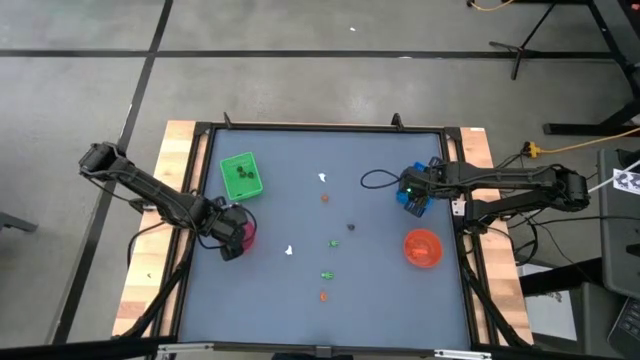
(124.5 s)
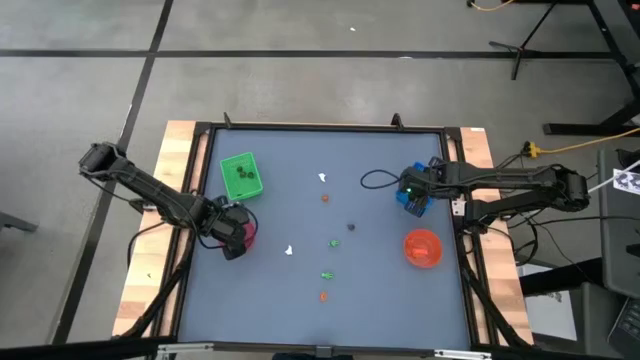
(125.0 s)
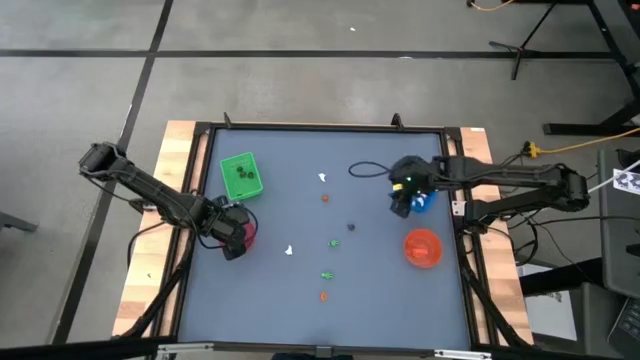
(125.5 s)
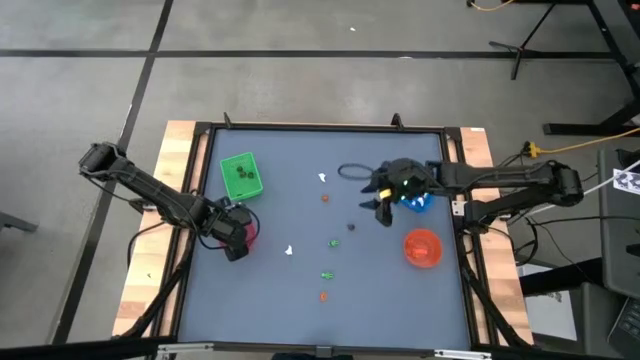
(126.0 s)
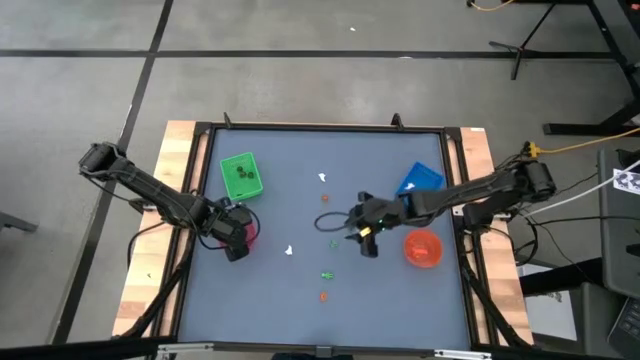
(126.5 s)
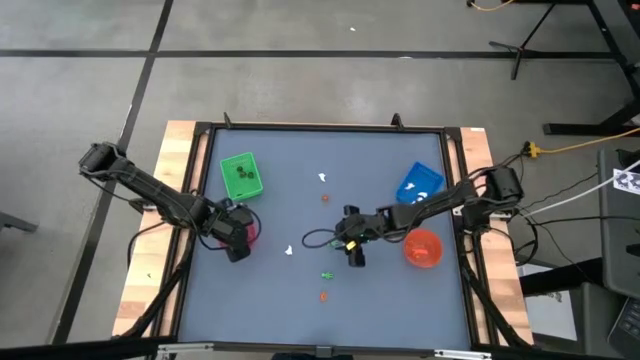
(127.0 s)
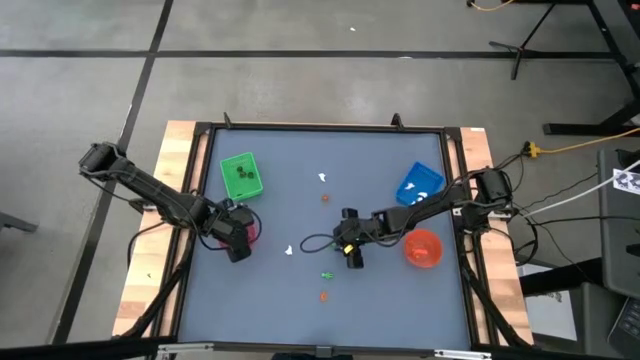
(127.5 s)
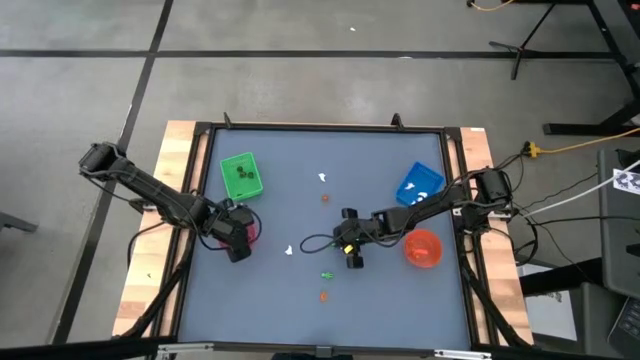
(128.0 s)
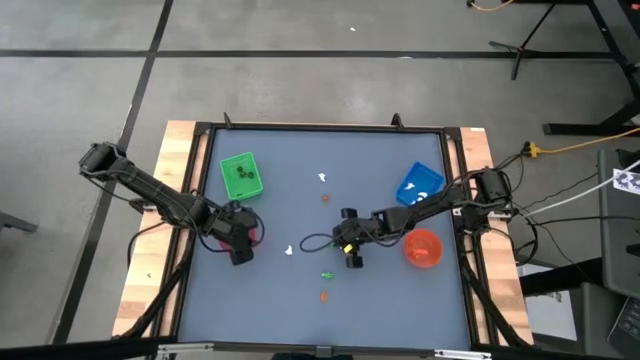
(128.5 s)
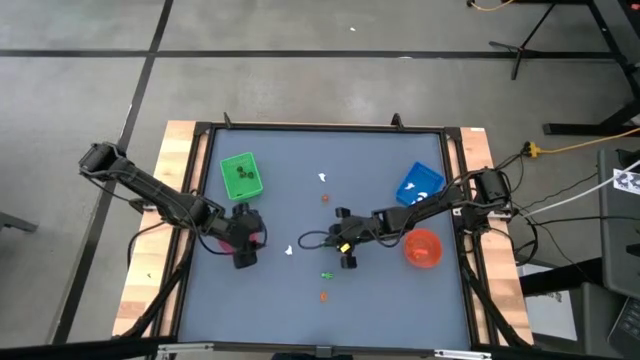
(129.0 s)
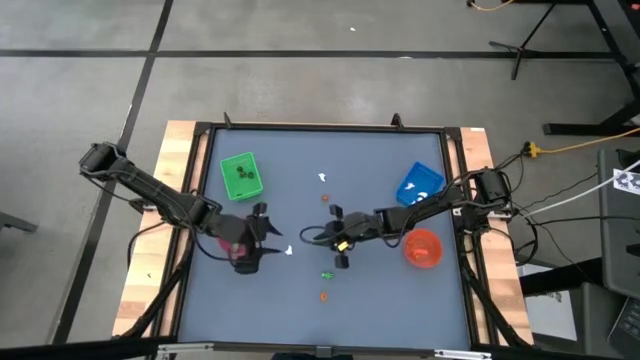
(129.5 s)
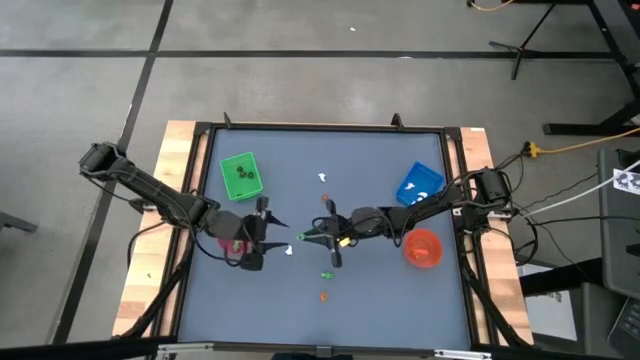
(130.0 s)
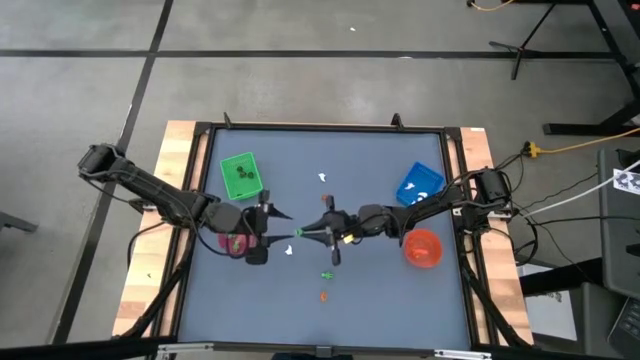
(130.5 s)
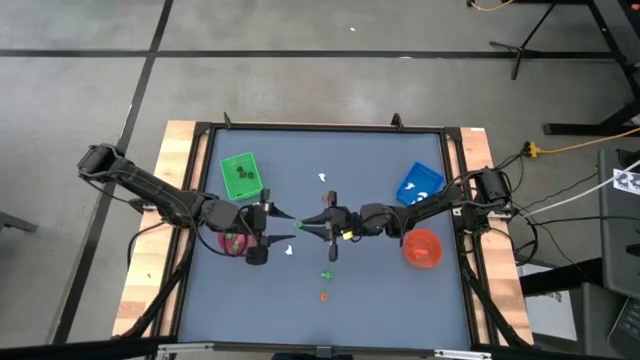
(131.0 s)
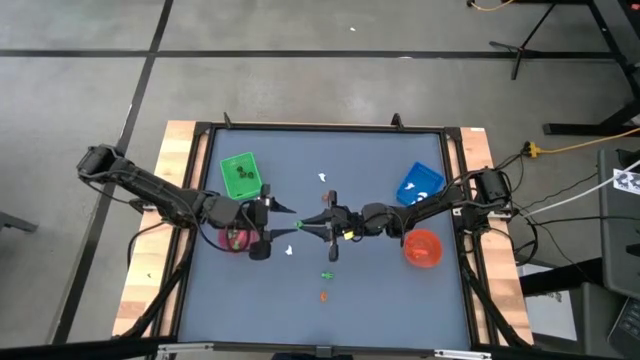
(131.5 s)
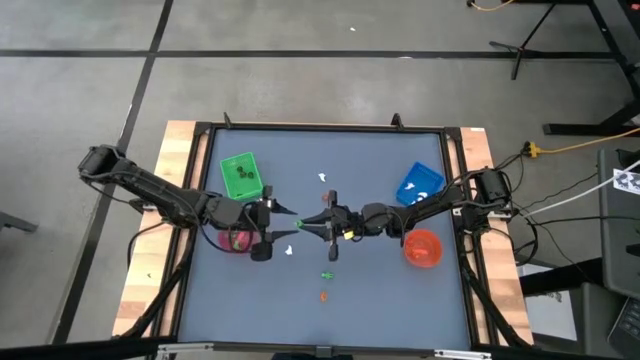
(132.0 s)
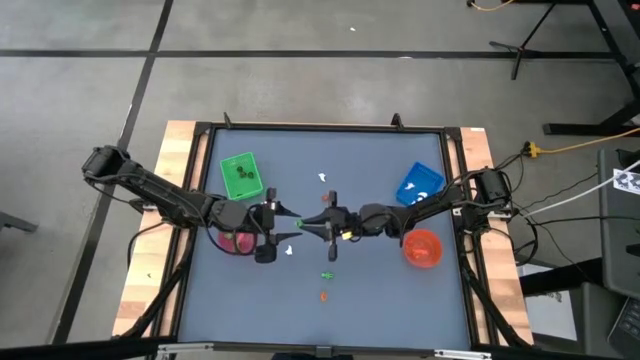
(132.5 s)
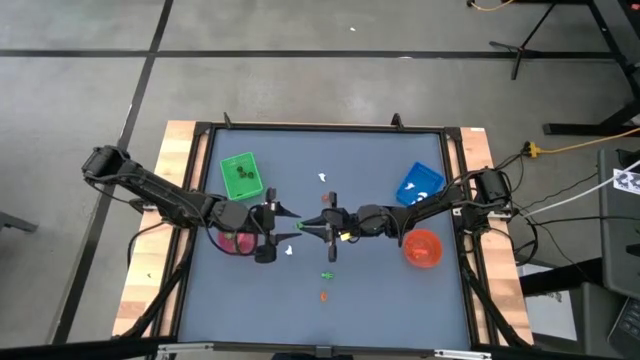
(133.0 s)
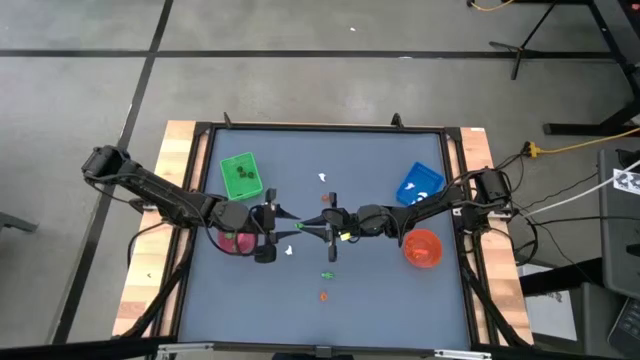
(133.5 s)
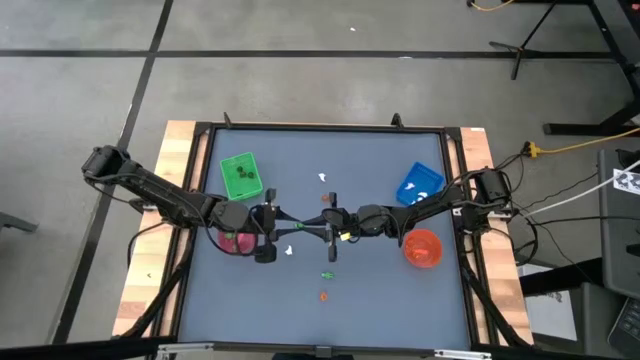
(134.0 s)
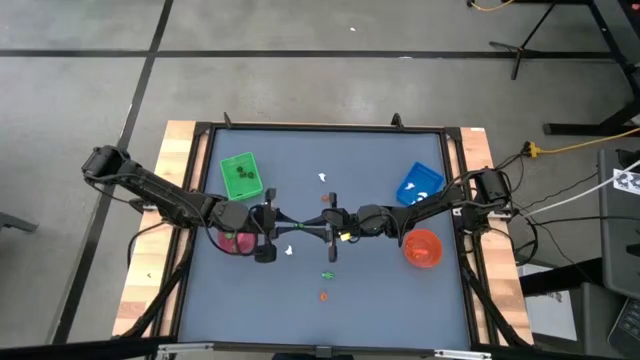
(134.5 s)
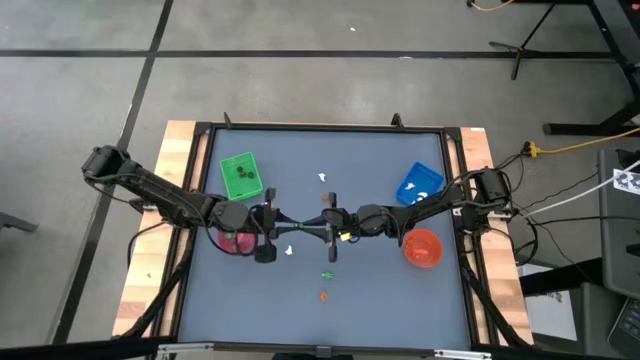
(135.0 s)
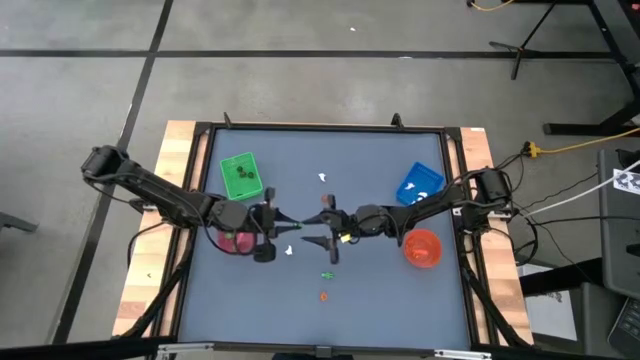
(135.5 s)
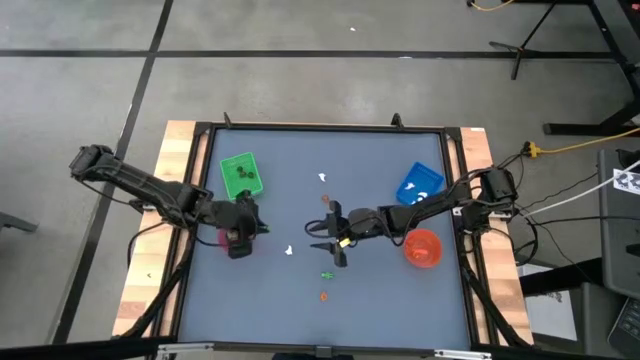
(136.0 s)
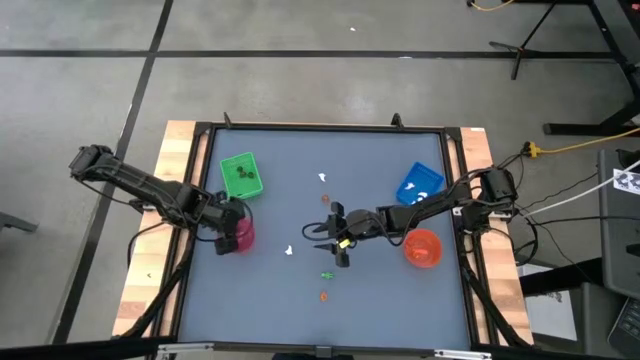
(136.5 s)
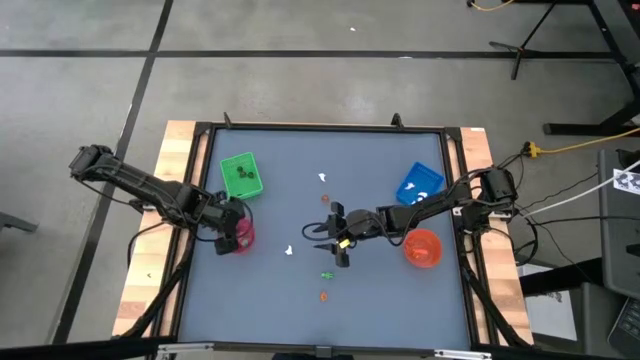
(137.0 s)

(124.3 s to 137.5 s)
Task: Sort Halloween decoration
Put the small green skeleton toy into the transparent red bowl

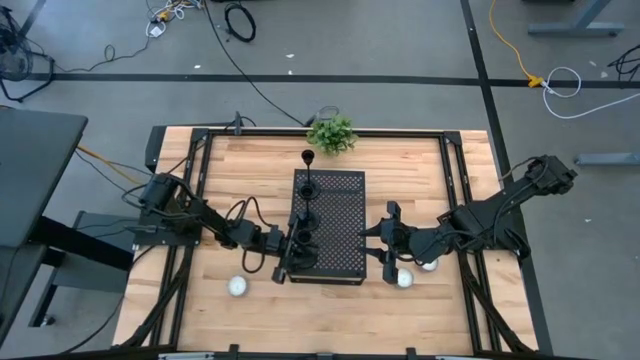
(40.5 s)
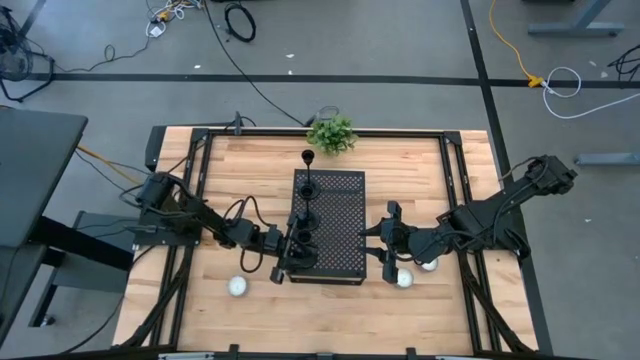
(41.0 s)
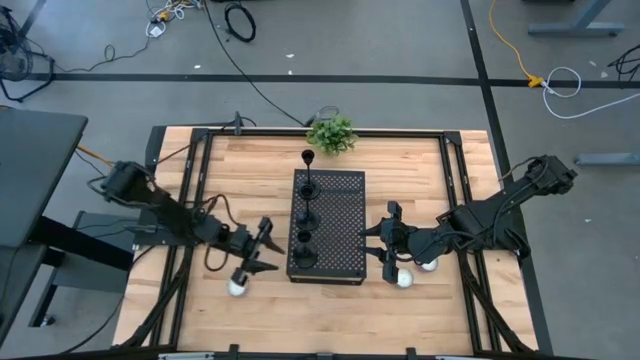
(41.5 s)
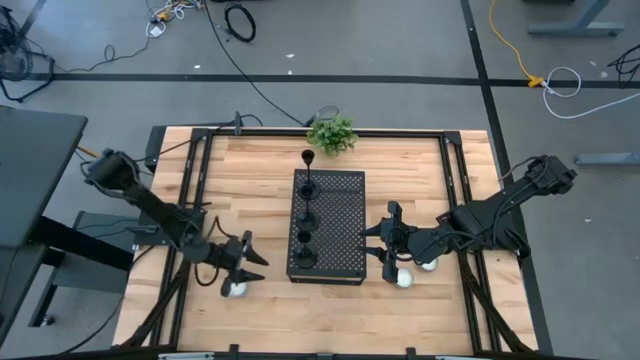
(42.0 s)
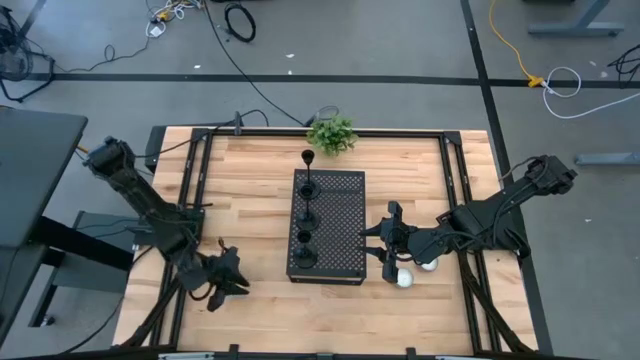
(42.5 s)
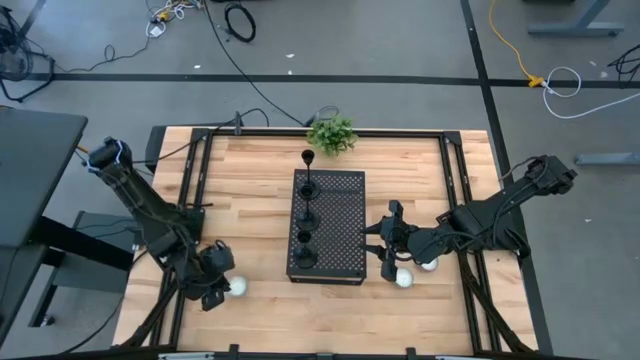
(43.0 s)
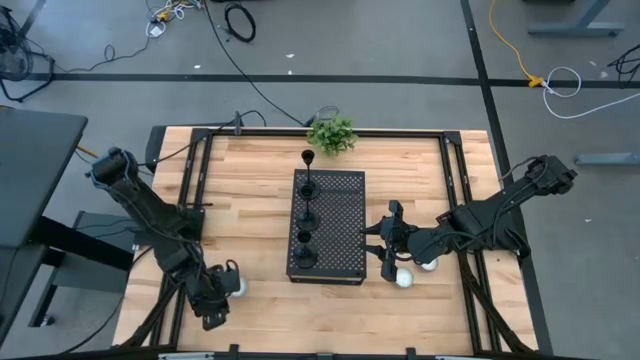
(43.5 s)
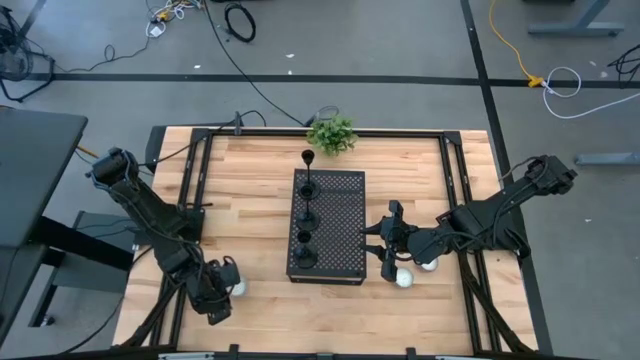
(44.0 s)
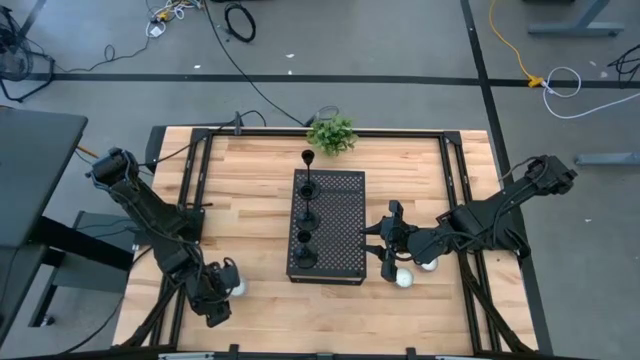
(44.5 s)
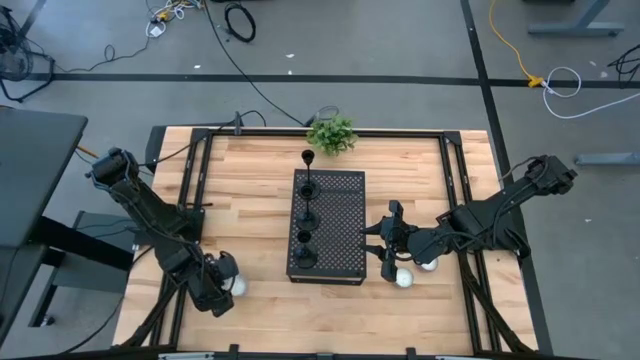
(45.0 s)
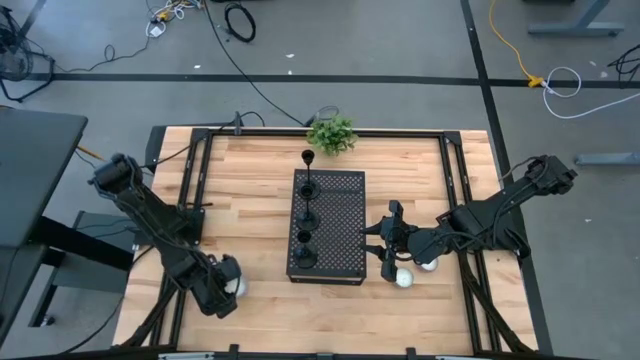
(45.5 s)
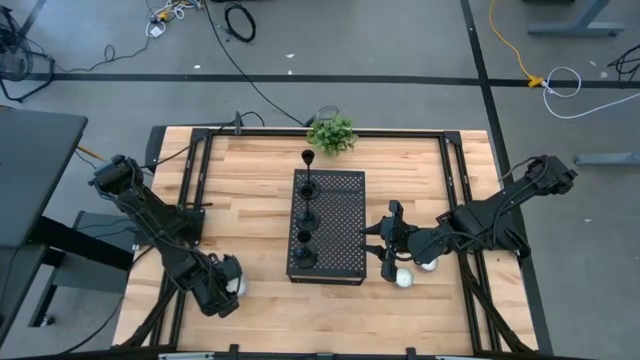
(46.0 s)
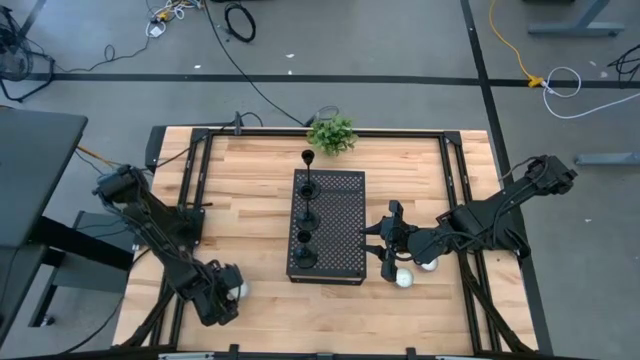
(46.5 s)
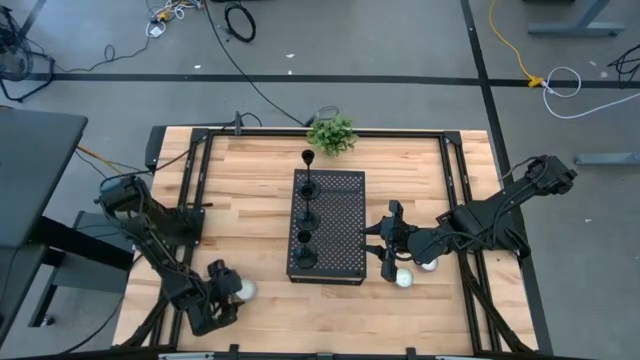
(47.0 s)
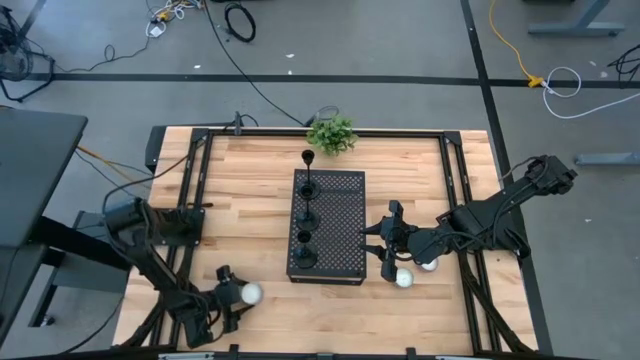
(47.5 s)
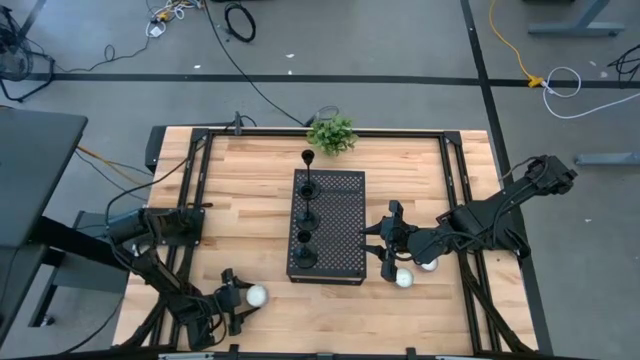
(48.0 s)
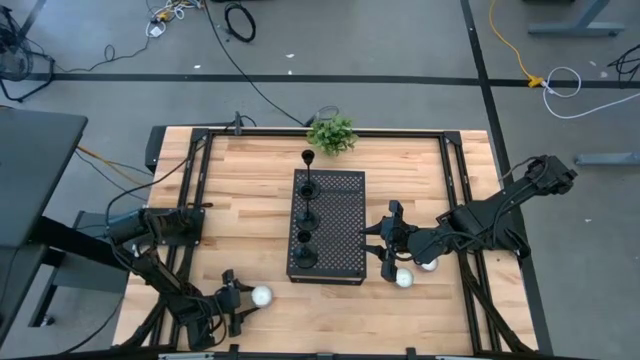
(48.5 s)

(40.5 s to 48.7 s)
Task: Pick & Place candle stick holders
Put the white scented candle on the shelf
